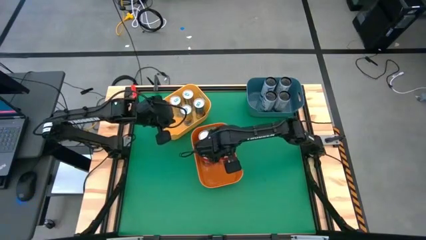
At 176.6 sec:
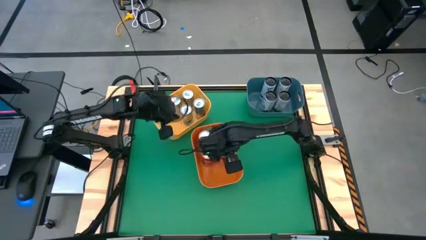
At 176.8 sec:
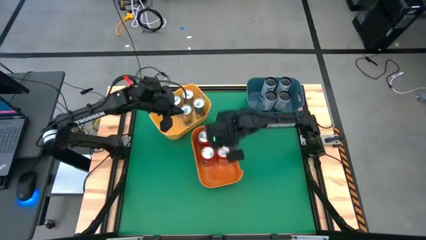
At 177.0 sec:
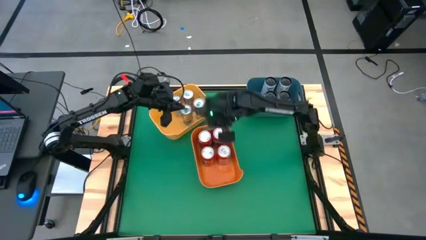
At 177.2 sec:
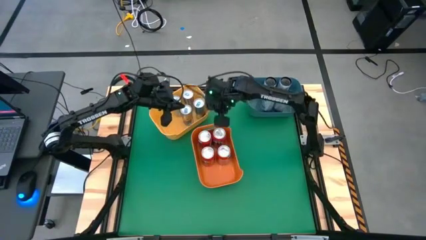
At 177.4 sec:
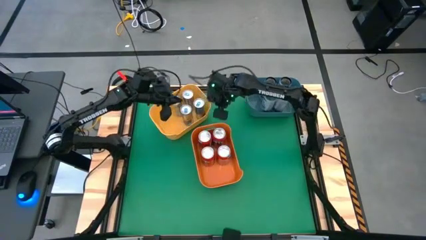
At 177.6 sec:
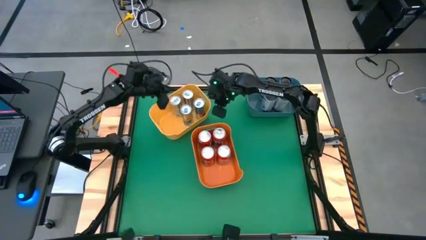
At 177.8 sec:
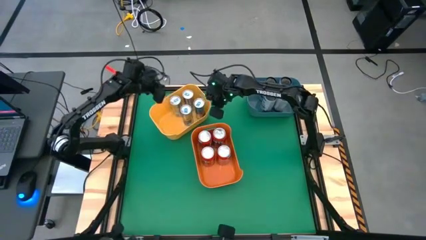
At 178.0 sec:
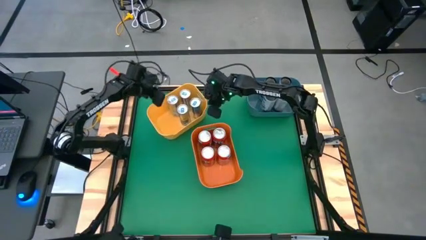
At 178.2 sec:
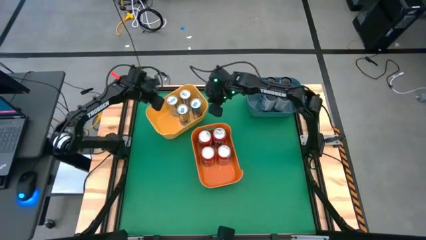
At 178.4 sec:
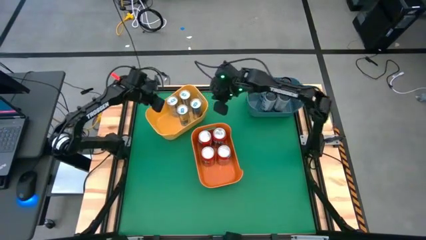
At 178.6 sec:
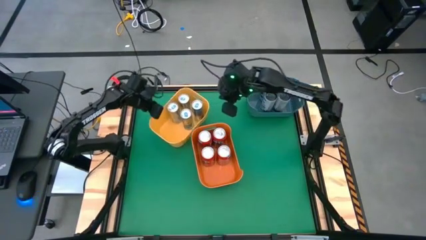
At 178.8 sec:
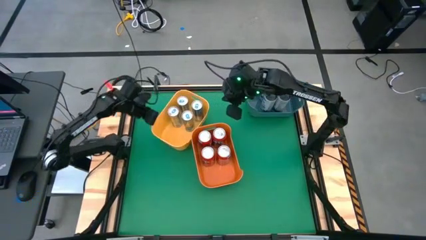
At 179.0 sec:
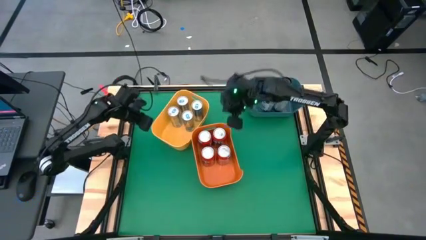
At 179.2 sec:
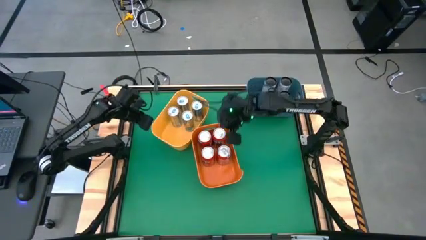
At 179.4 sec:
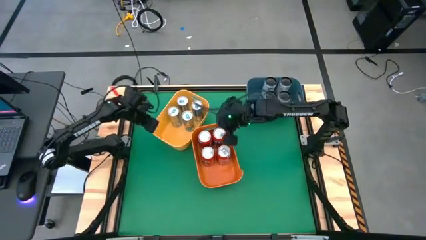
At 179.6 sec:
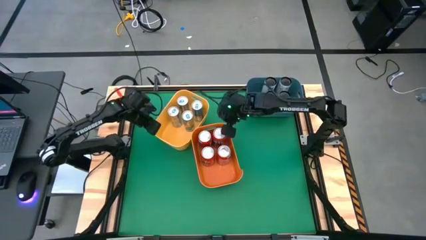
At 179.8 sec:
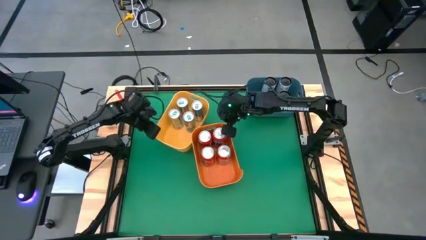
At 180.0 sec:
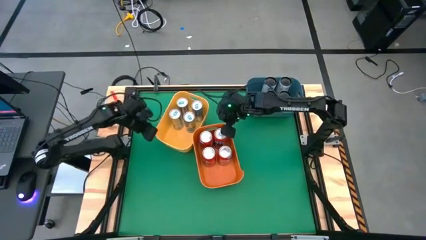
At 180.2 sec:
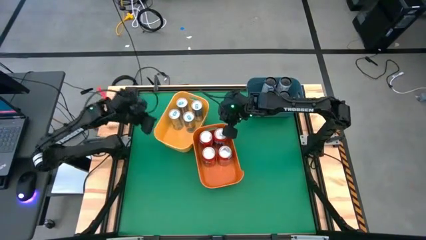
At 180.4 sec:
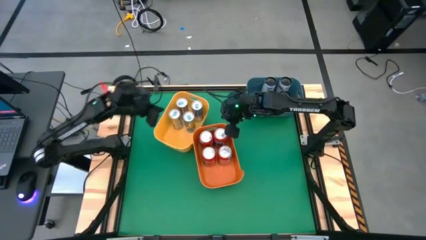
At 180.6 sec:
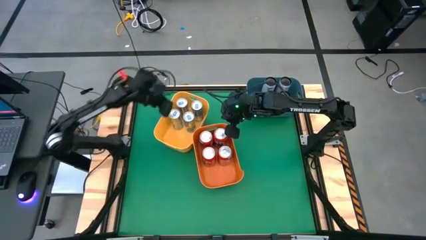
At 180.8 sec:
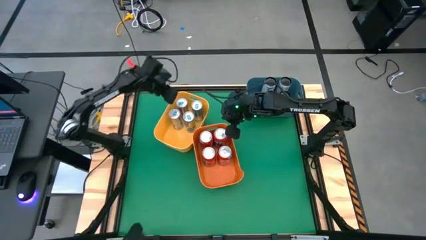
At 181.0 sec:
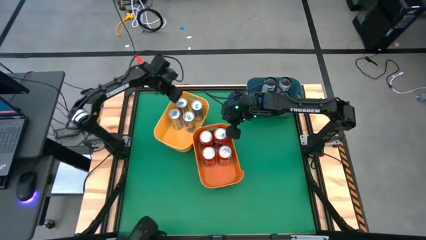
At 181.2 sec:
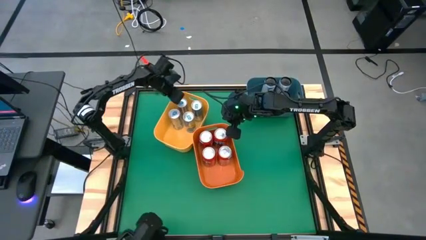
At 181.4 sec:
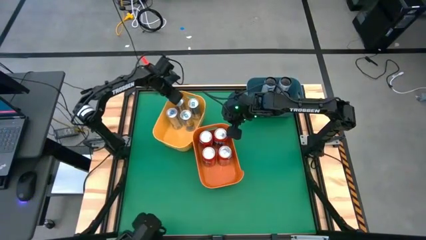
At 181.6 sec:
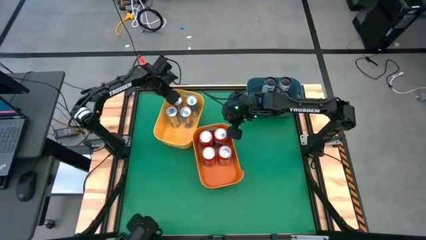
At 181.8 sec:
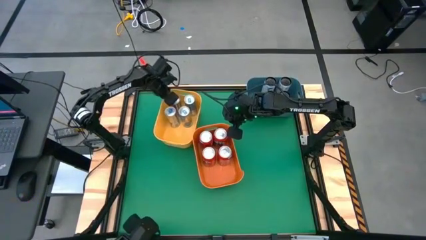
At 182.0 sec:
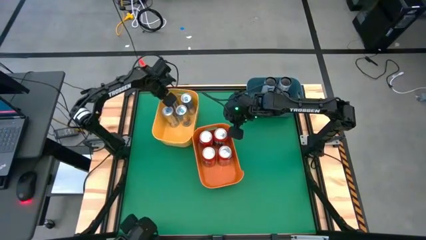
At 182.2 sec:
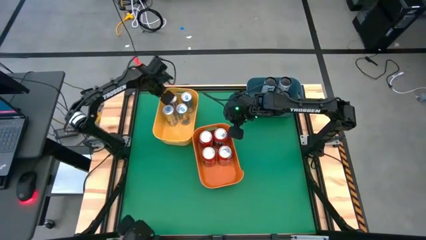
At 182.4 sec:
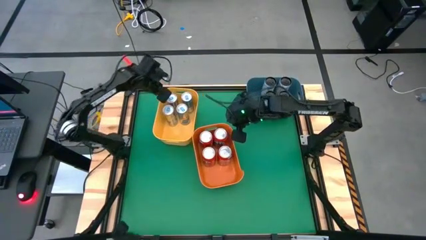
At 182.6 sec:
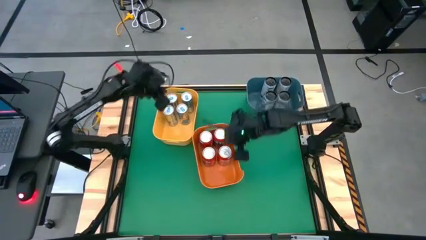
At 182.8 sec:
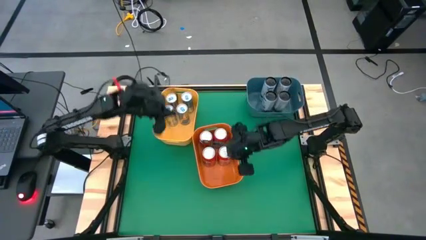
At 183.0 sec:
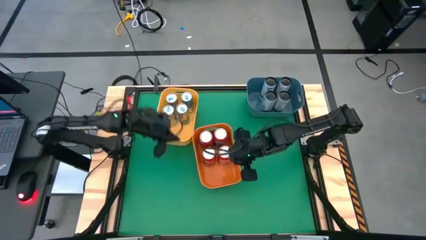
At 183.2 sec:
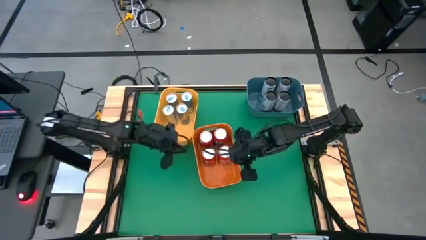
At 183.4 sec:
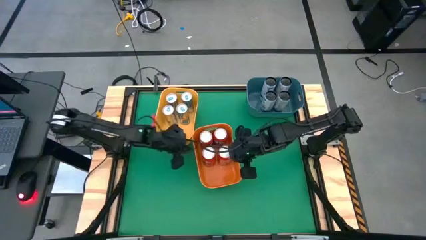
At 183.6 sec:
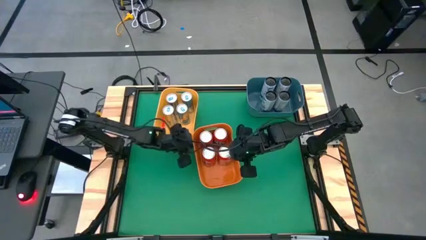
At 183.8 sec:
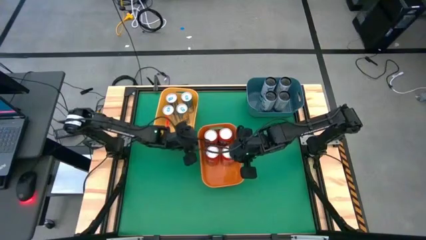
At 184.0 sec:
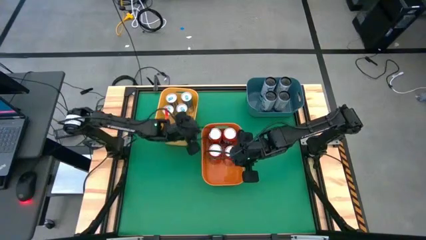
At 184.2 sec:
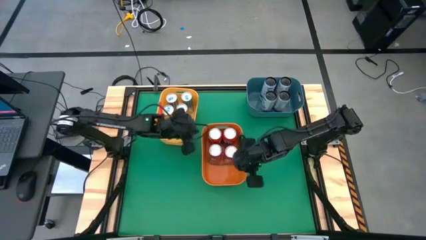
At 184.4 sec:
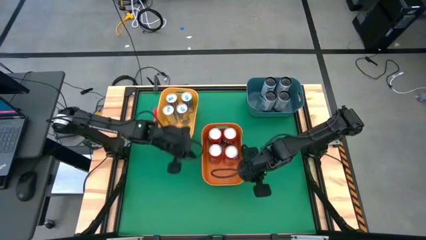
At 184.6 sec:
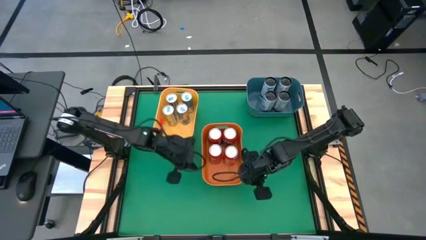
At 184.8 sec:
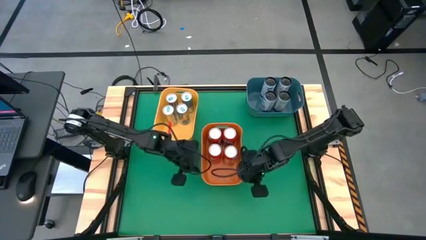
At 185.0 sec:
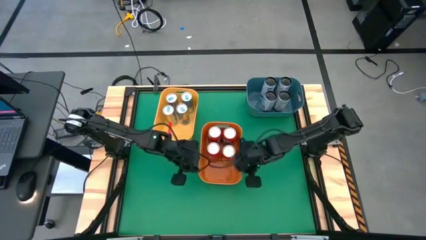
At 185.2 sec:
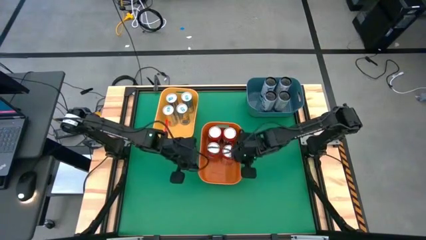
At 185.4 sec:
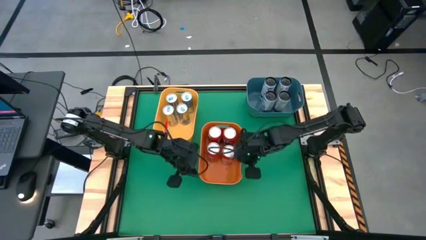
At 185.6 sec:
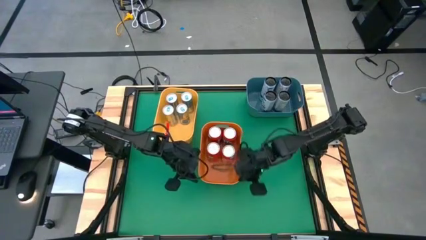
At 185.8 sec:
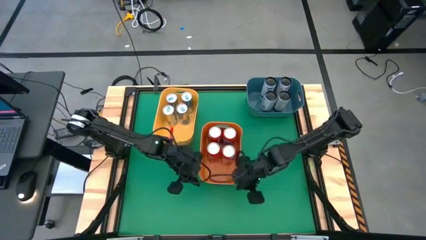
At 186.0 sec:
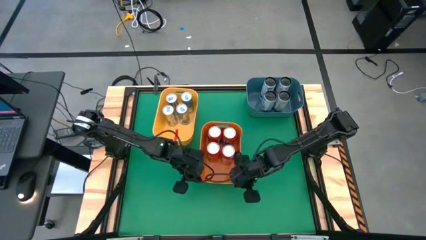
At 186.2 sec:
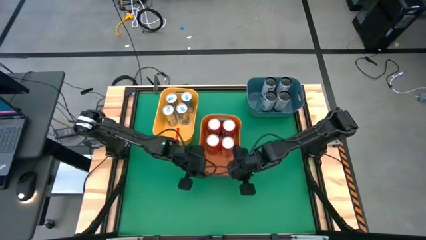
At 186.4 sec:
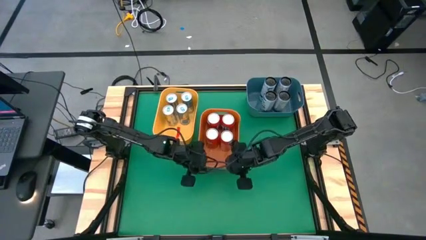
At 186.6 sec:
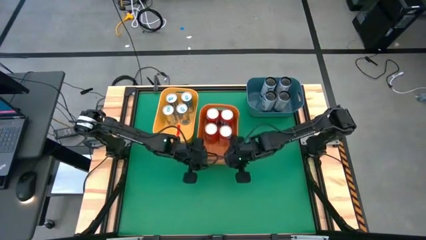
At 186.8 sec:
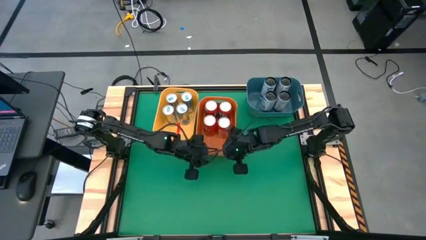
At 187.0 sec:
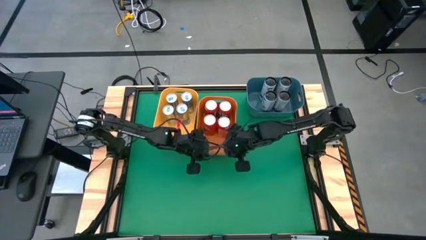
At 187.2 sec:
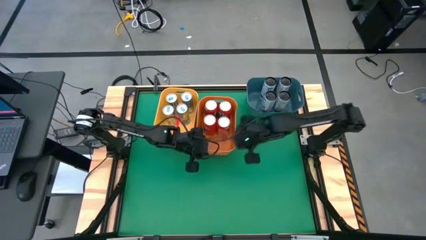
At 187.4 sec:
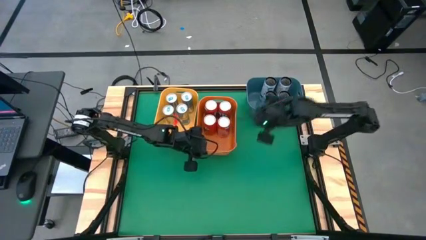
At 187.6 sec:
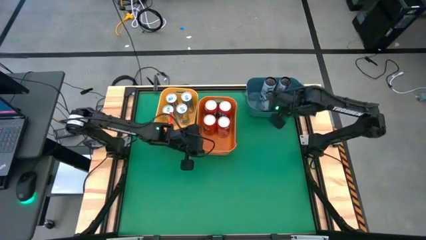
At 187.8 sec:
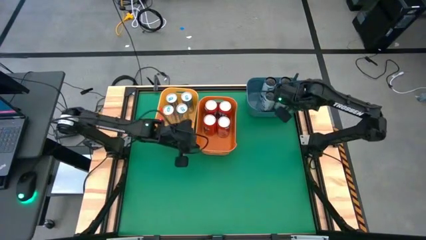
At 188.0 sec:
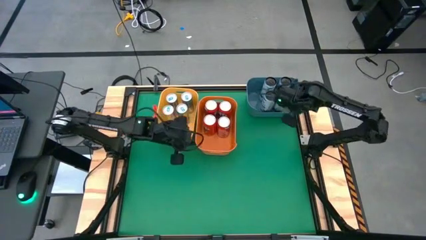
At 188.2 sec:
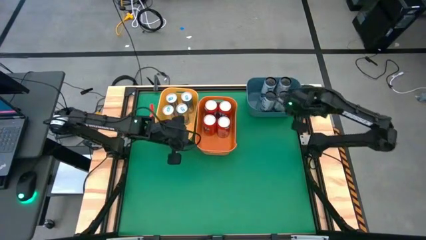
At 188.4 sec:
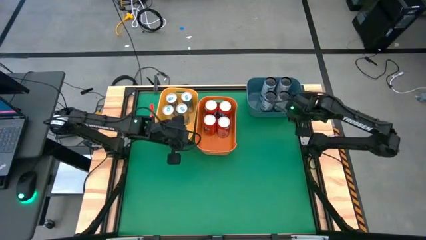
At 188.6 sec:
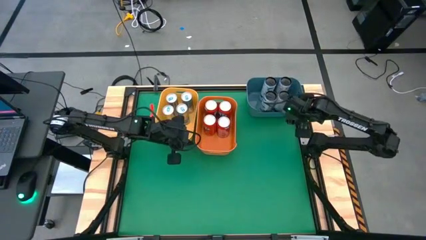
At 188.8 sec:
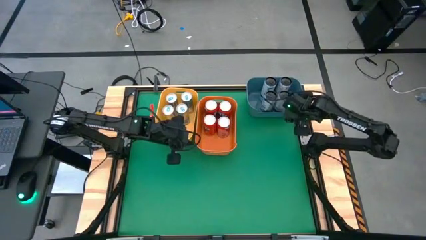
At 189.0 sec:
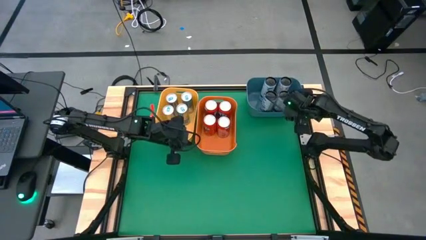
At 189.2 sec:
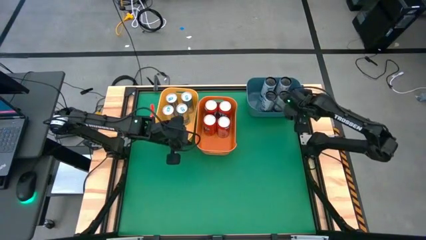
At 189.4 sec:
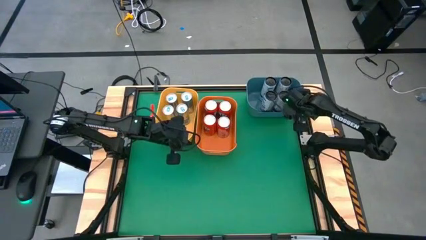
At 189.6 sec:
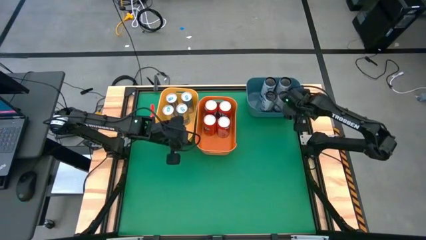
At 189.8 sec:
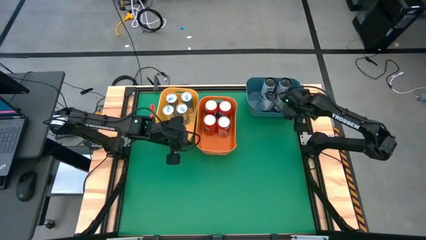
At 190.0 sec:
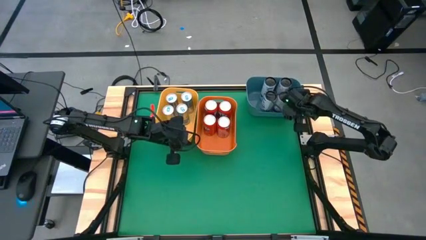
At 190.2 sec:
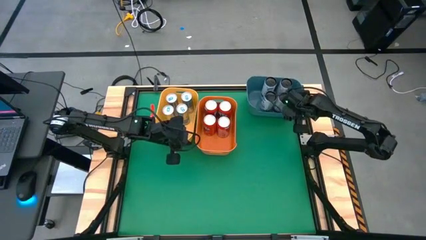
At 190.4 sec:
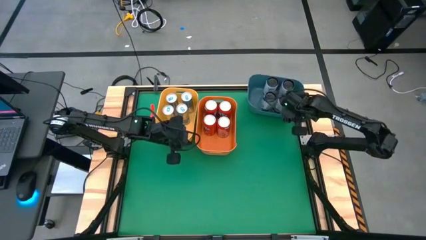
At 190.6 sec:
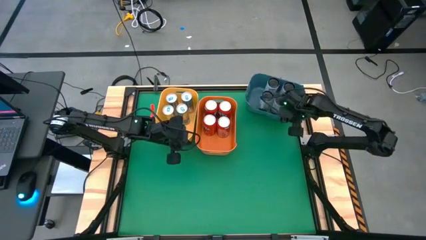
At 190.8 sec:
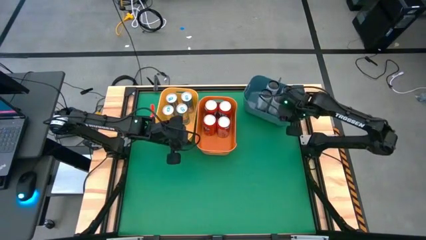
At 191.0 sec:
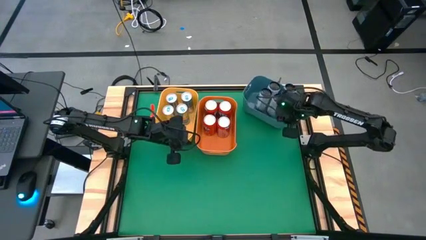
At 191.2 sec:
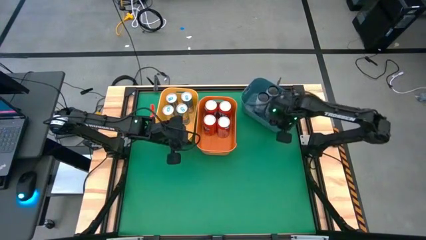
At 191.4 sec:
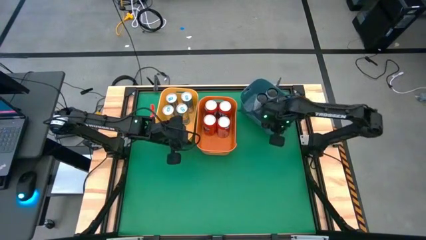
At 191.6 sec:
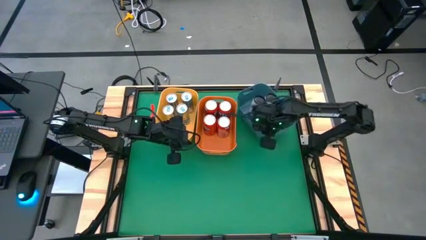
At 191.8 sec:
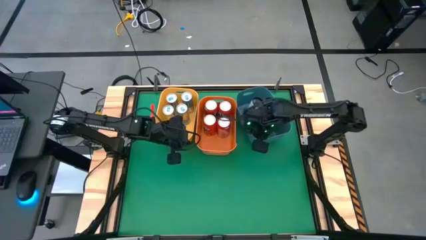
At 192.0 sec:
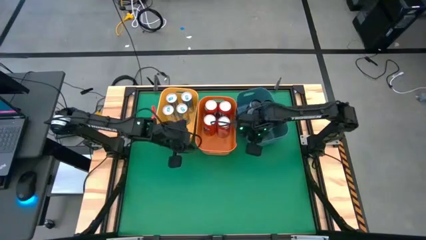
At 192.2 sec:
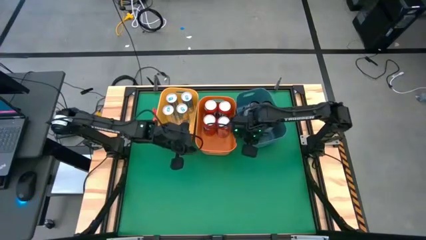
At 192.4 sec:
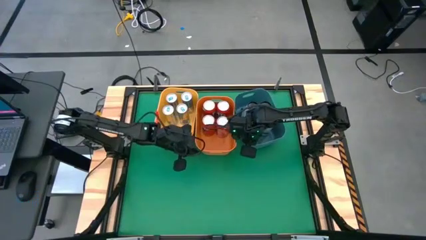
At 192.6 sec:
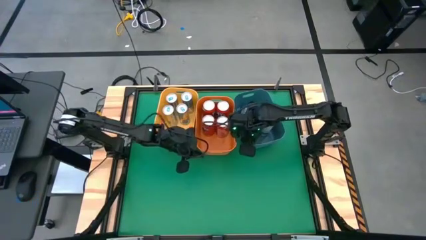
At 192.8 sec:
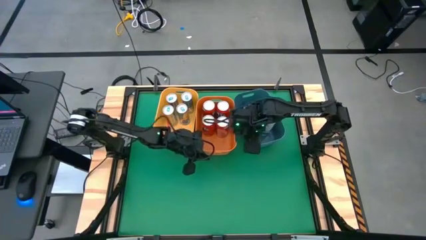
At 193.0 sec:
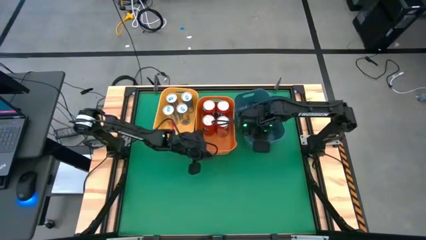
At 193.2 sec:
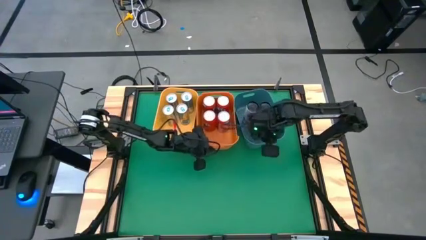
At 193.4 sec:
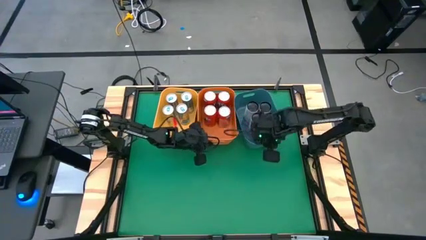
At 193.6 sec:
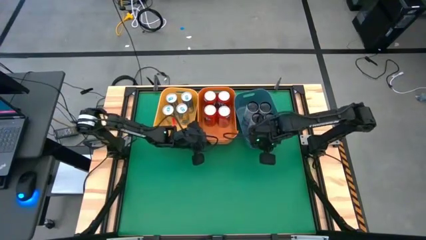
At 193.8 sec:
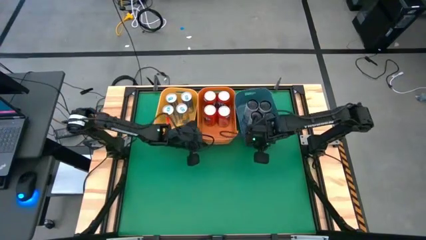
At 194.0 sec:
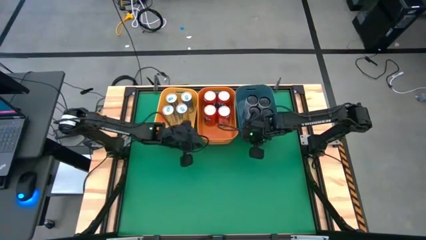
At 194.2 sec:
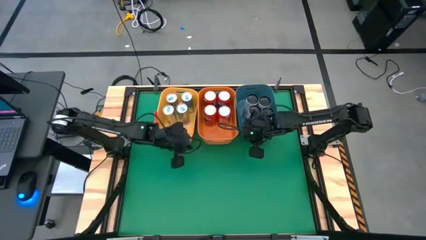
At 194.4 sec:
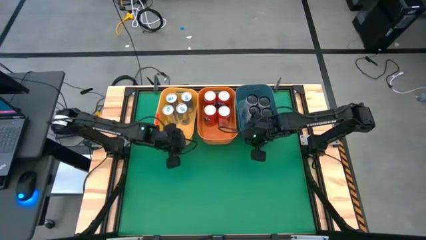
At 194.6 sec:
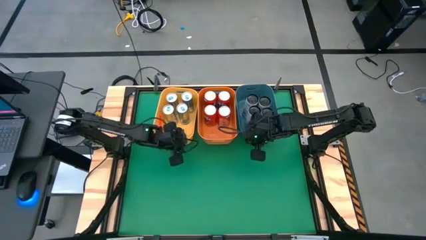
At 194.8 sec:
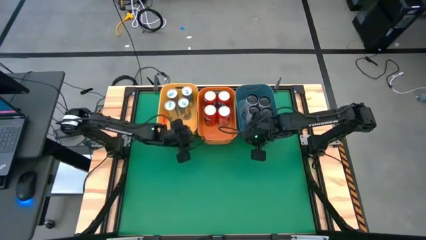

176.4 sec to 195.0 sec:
Task: Sort soda cans
Adjust all the bins
